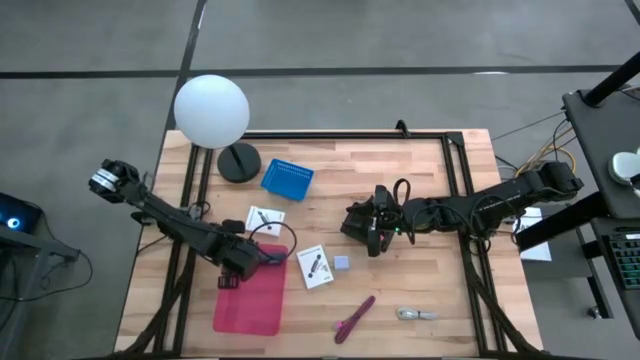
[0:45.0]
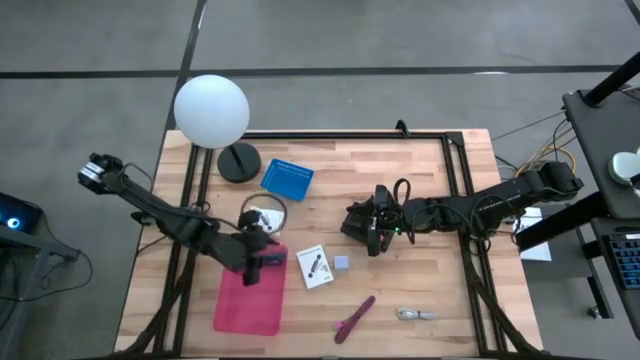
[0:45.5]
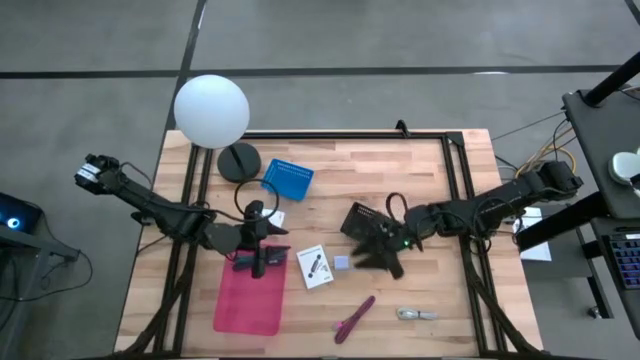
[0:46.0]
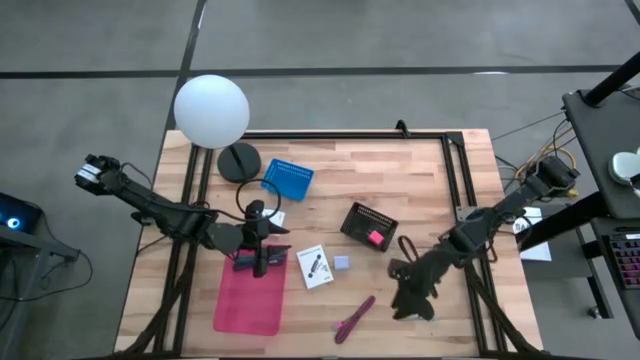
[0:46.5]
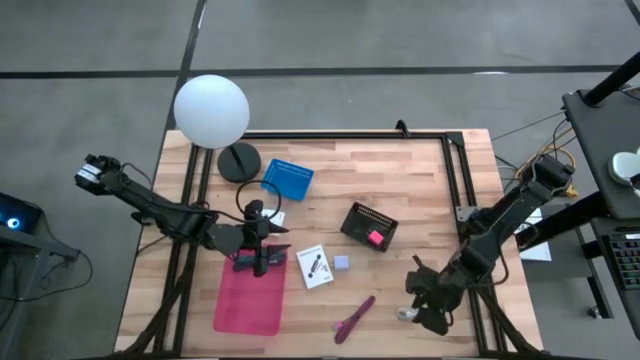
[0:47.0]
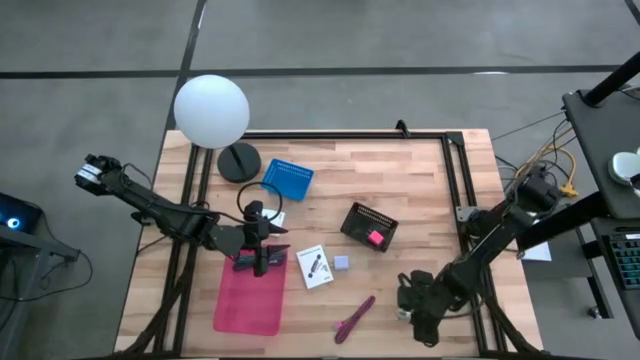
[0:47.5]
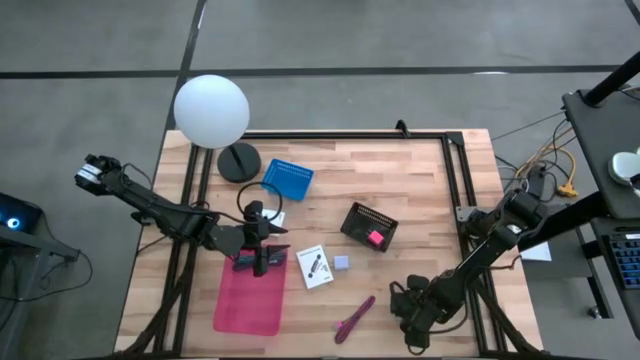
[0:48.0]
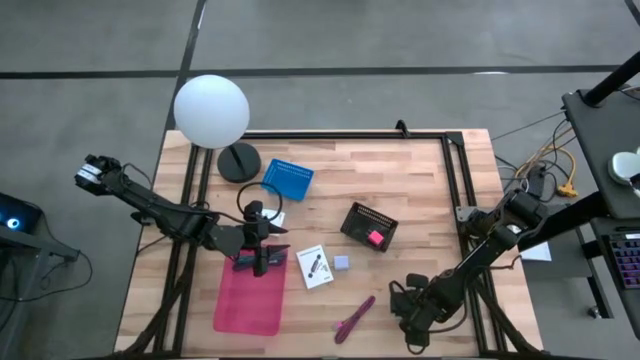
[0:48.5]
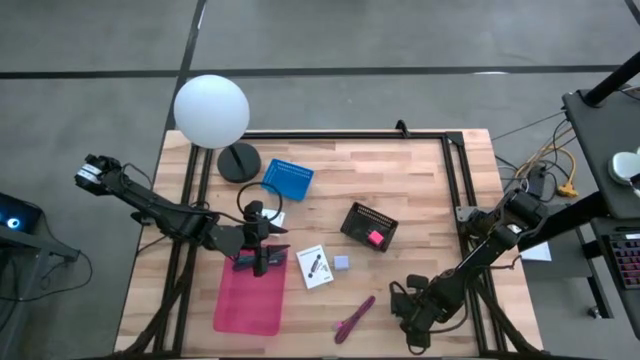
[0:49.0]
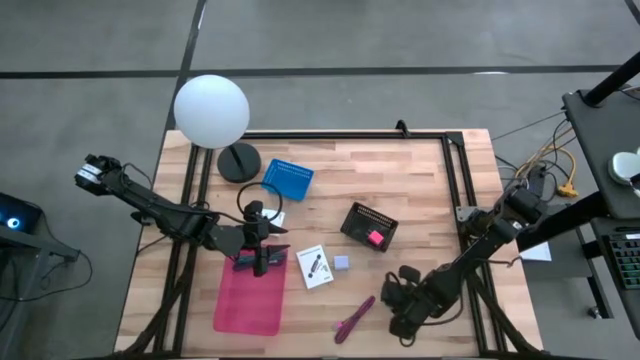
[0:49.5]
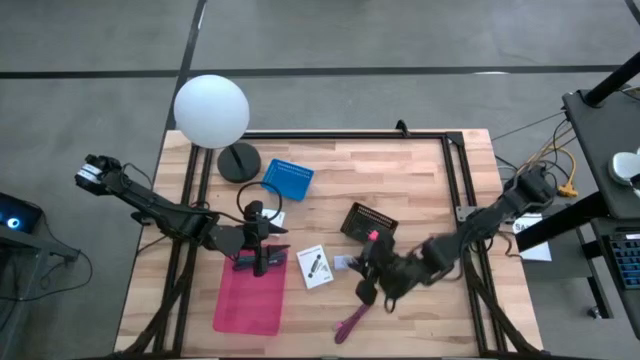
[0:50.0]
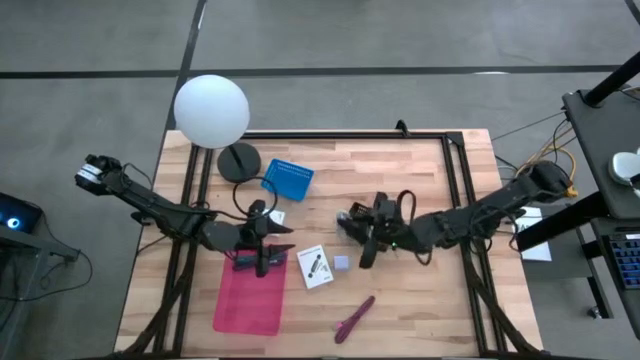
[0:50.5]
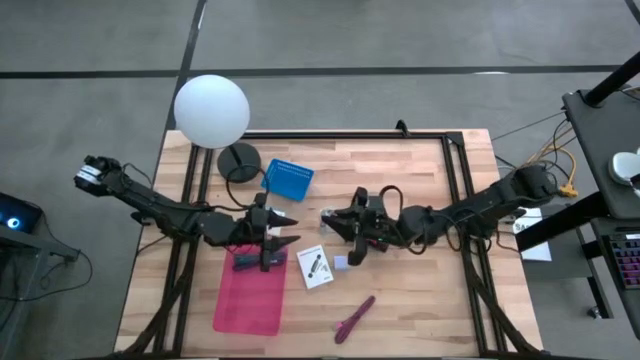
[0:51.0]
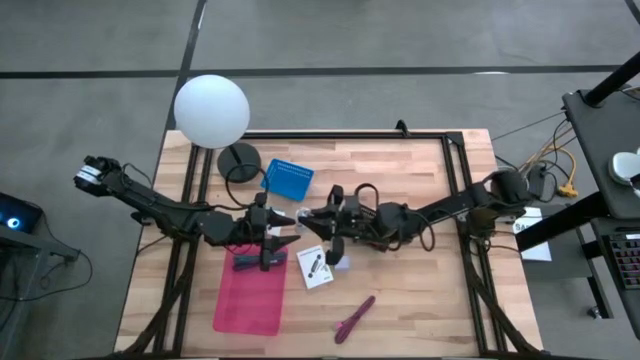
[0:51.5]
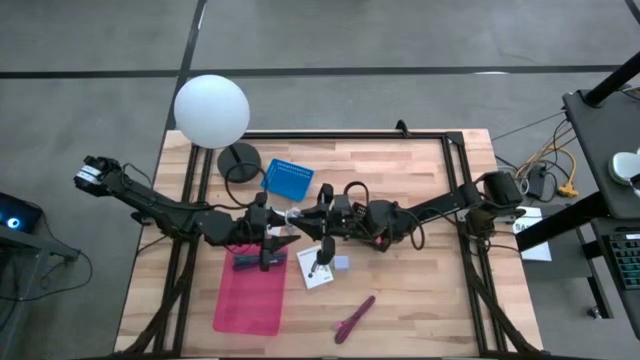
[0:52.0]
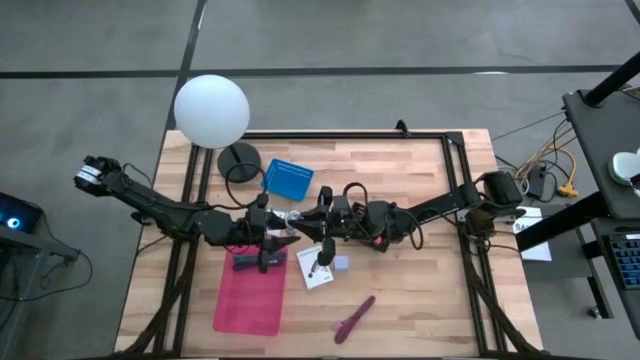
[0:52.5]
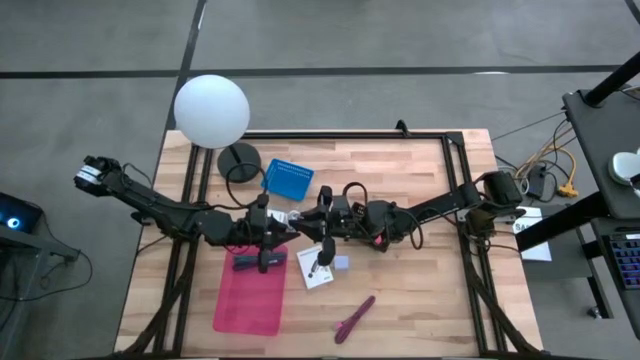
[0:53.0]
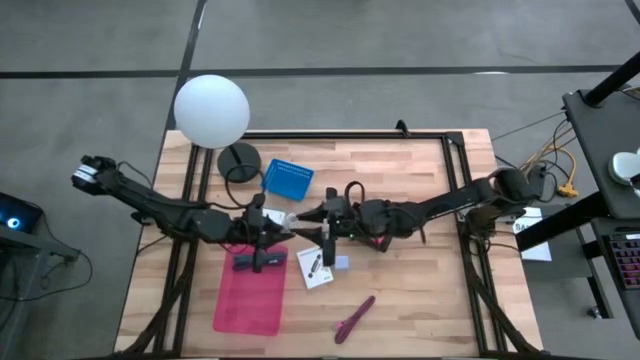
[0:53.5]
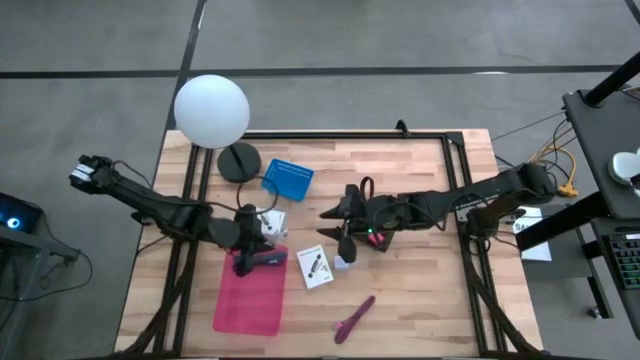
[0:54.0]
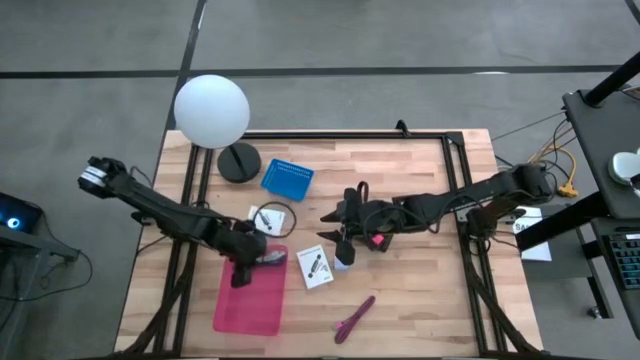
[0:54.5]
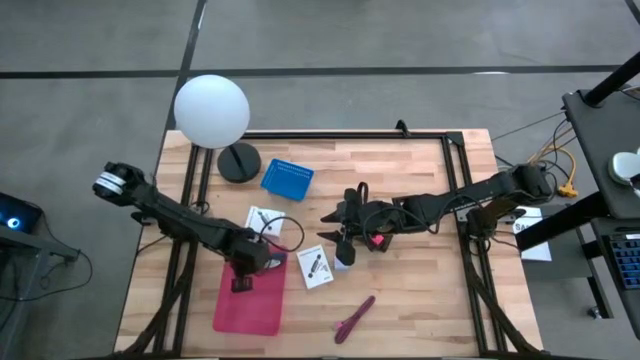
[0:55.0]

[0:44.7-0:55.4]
Task: Pick and place items into bin
Put the white charger cable into the pink bin

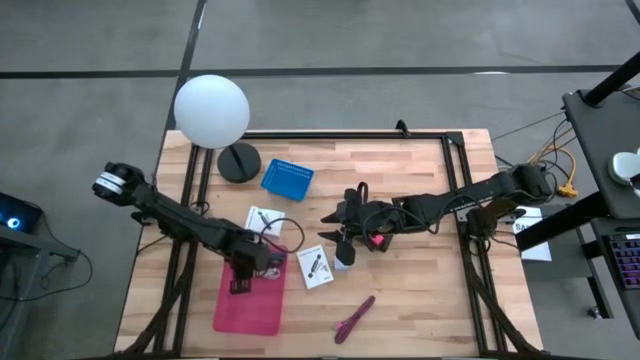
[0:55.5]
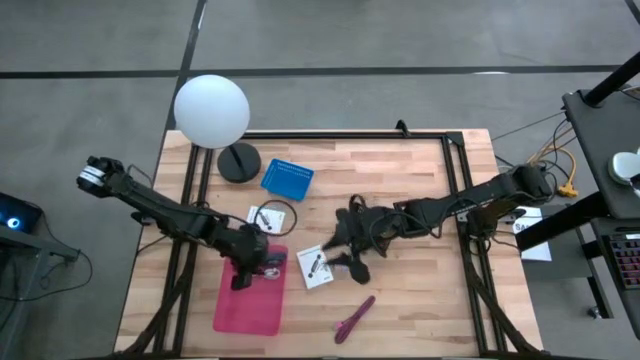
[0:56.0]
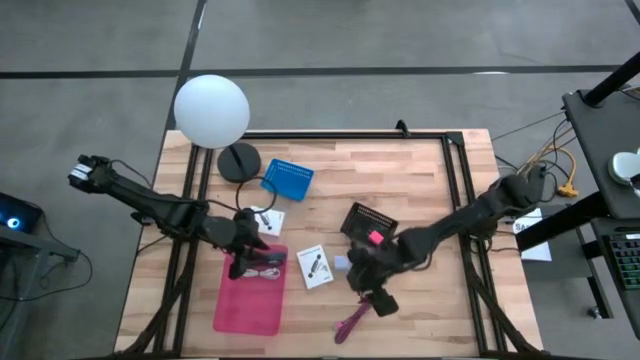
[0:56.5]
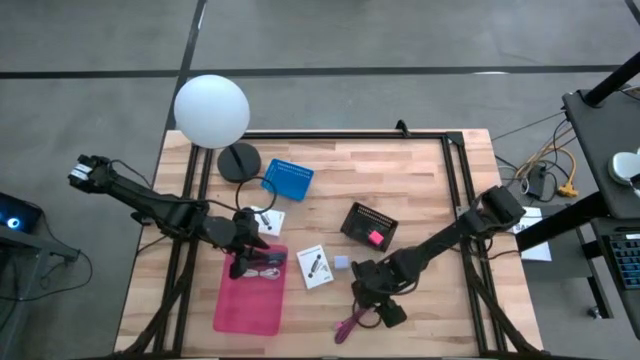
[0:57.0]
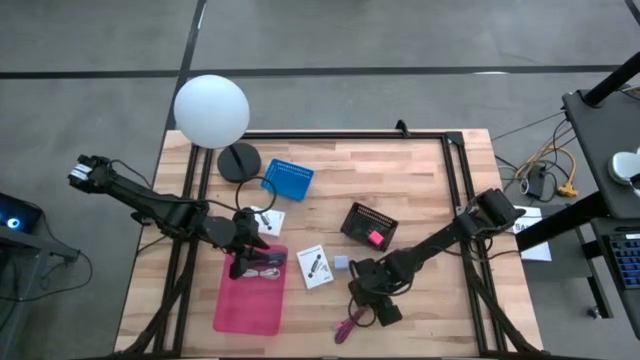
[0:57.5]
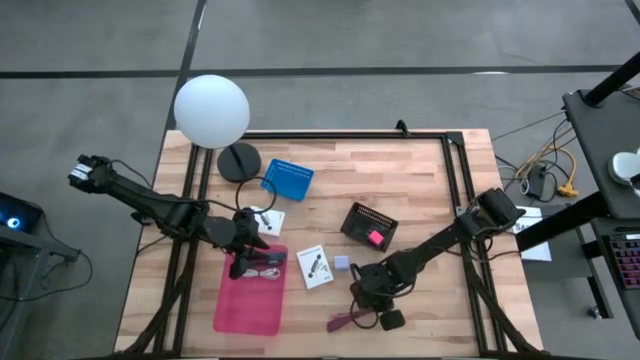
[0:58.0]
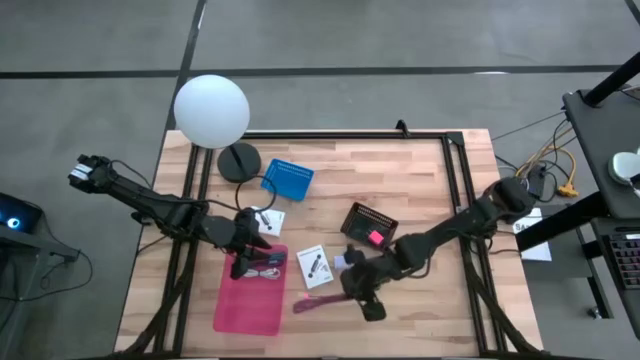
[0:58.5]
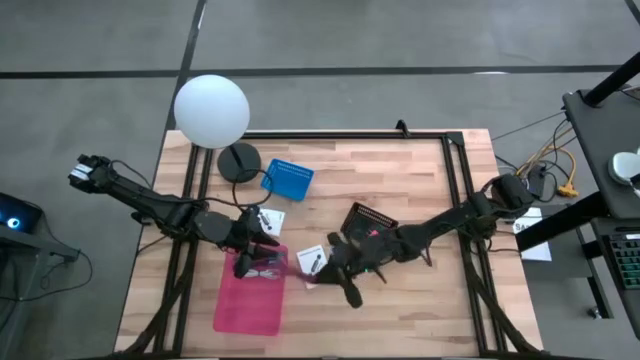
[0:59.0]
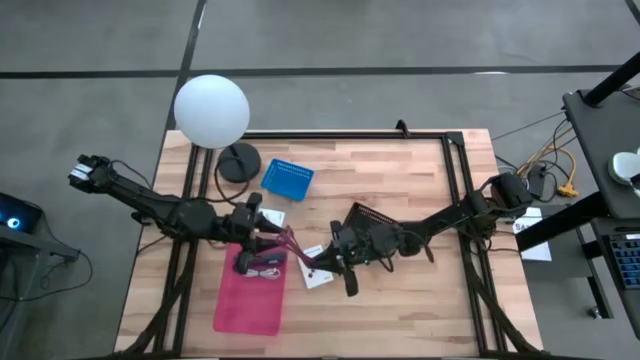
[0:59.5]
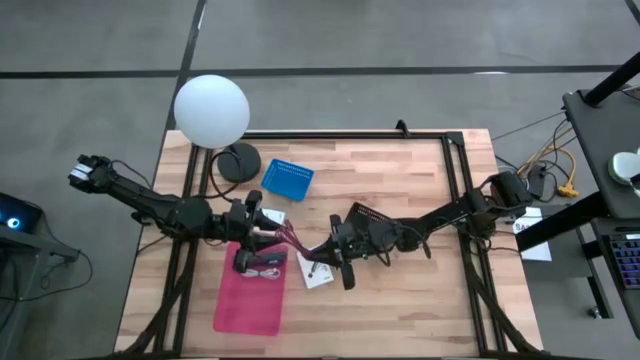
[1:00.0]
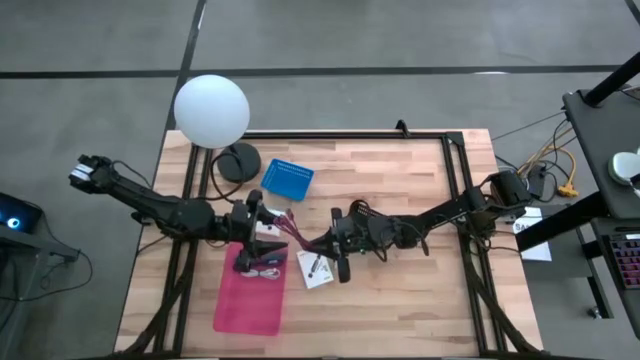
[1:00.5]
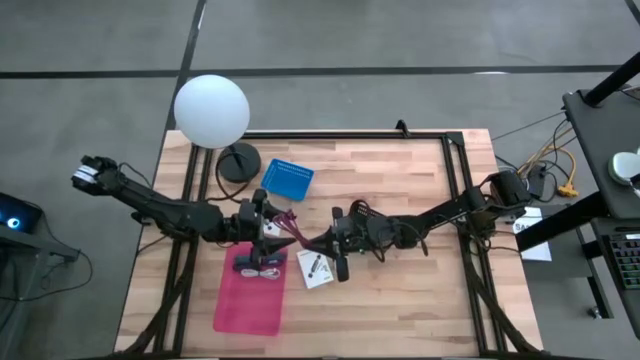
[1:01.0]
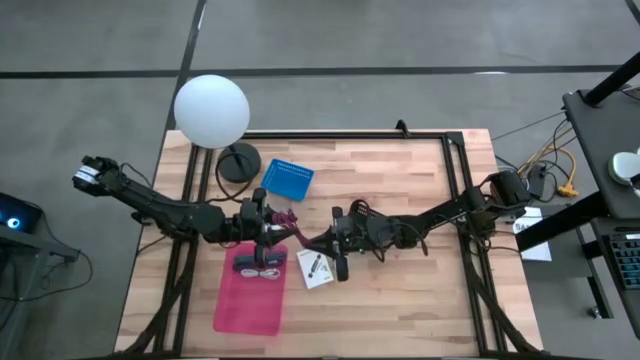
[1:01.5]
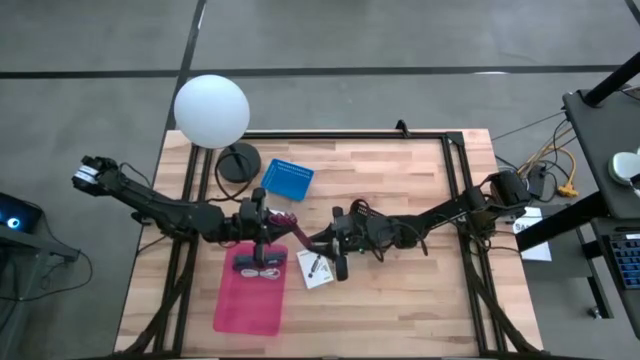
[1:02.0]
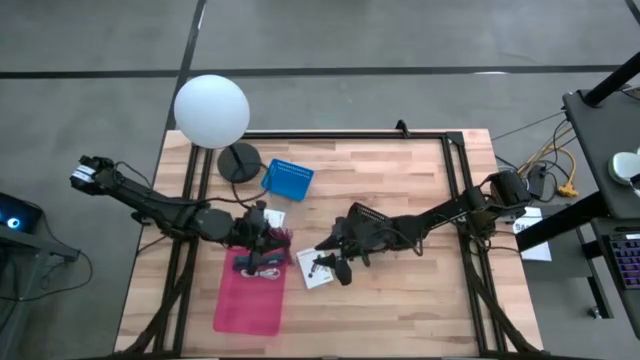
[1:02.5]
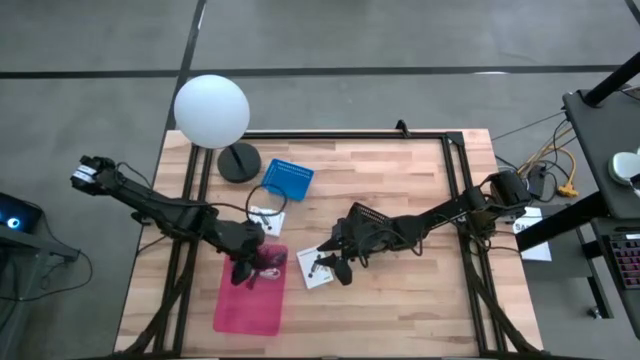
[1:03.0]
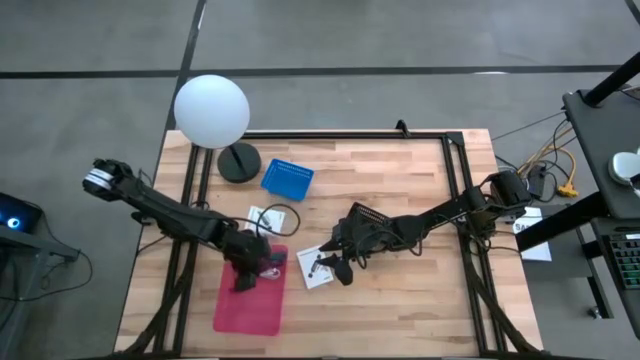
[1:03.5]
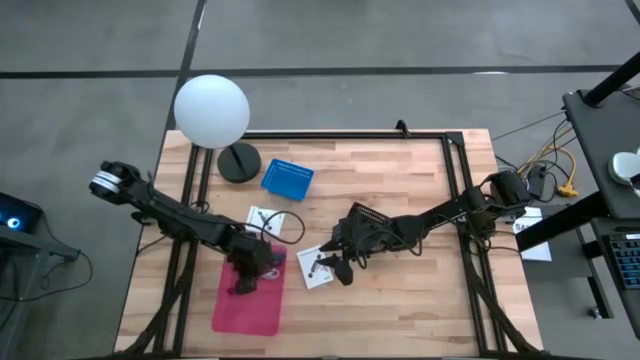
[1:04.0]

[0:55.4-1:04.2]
Put the pink charger cable into the pink bin

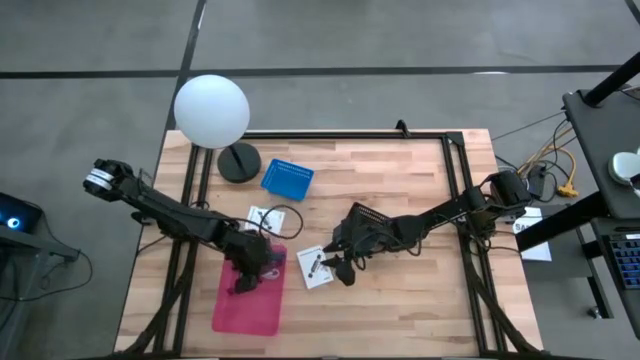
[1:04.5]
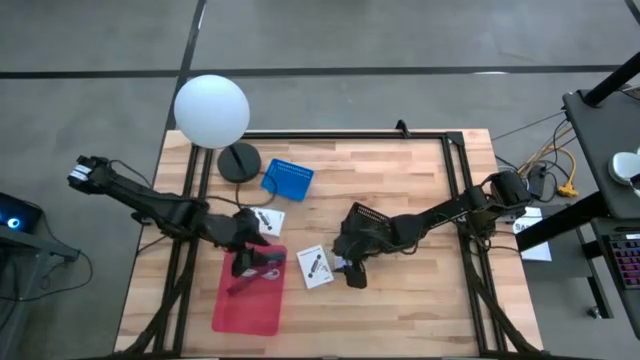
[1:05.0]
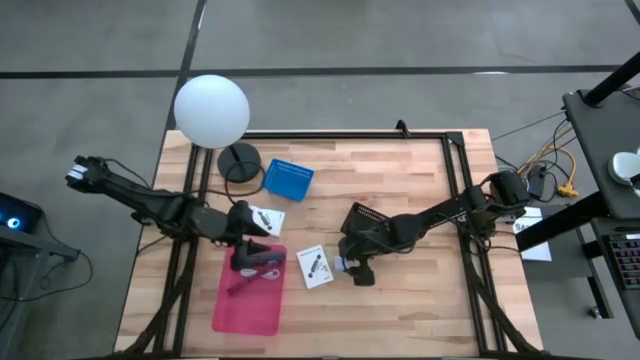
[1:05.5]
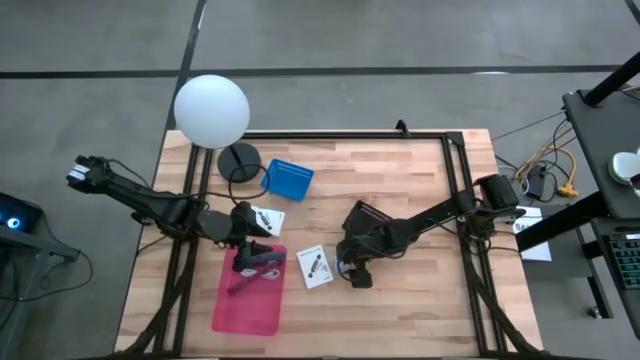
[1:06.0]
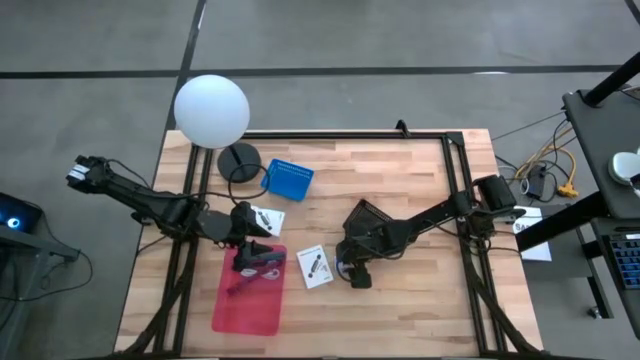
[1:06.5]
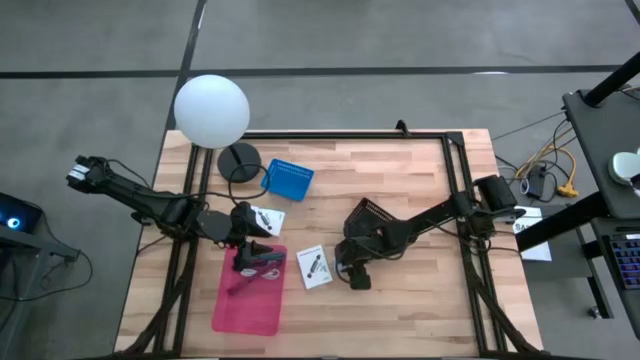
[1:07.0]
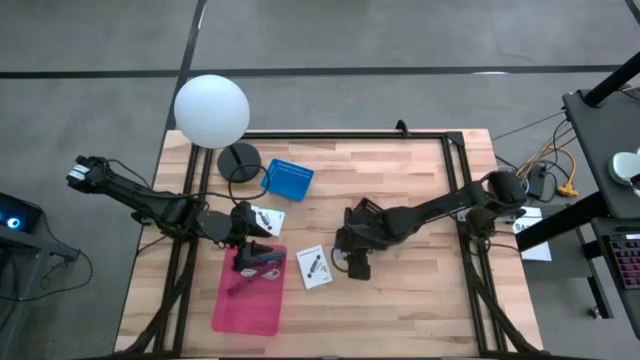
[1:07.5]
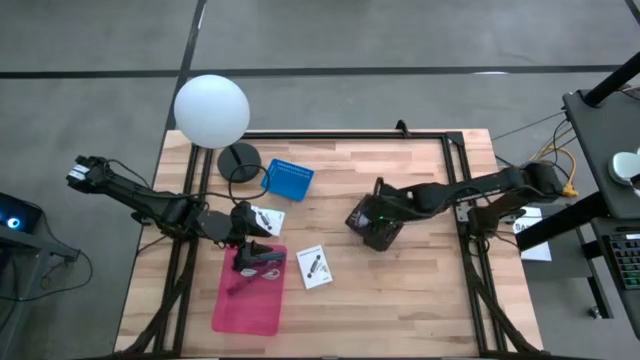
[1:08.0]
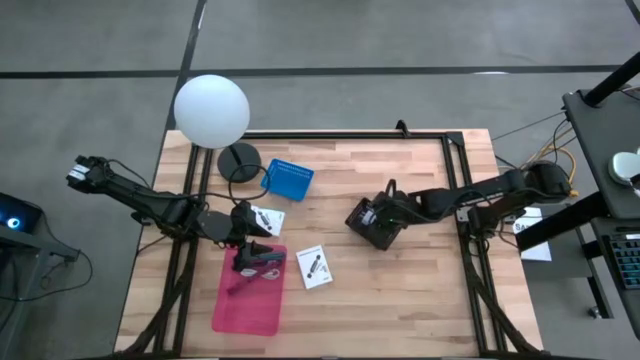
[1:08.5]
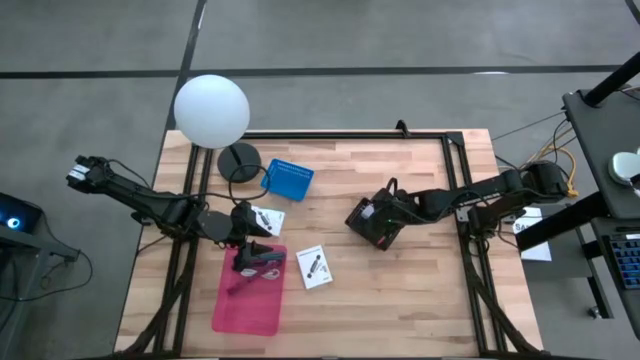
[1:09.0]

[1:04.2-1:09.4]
Put the white charger adapter into the black bin
